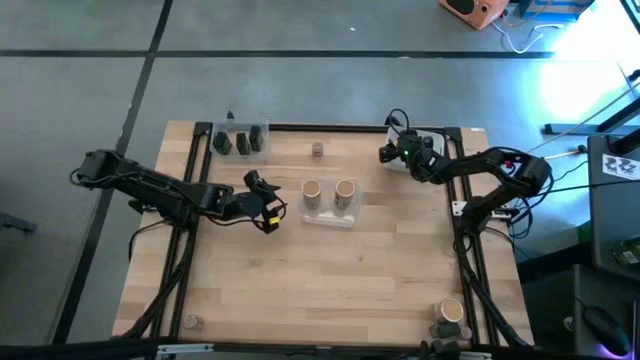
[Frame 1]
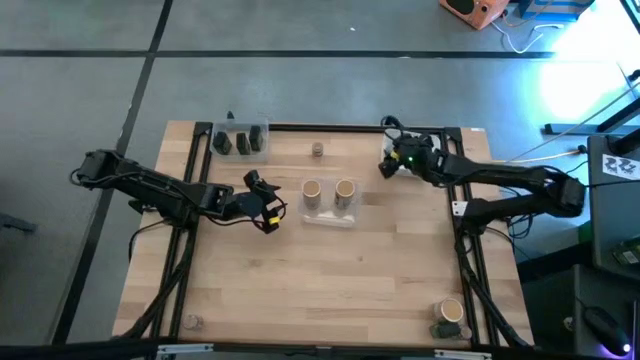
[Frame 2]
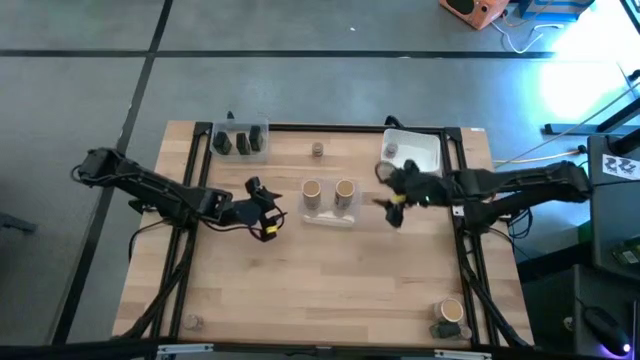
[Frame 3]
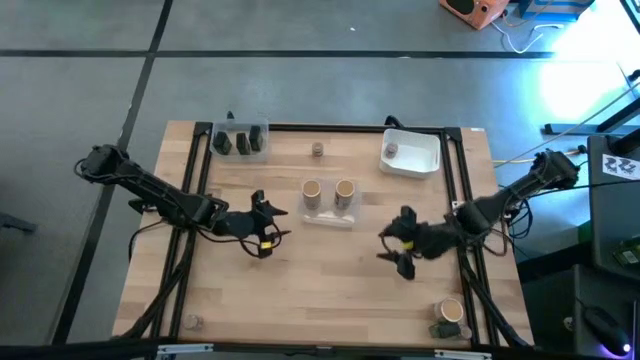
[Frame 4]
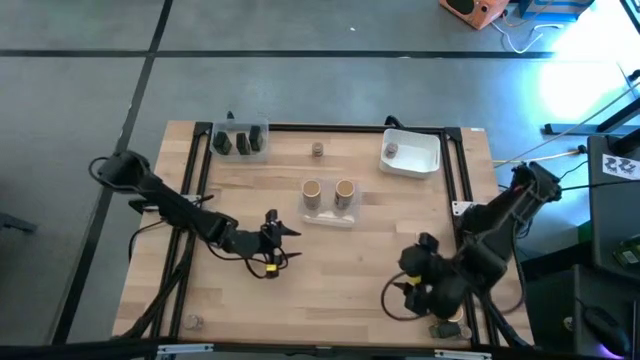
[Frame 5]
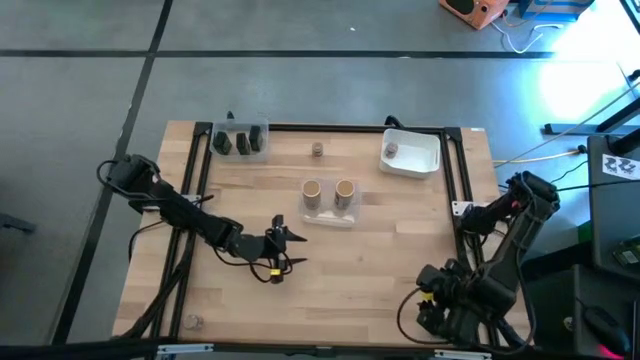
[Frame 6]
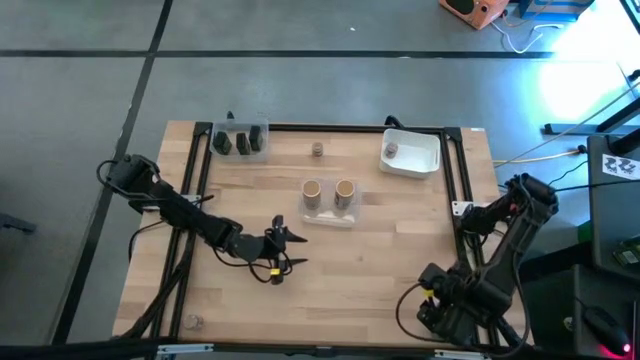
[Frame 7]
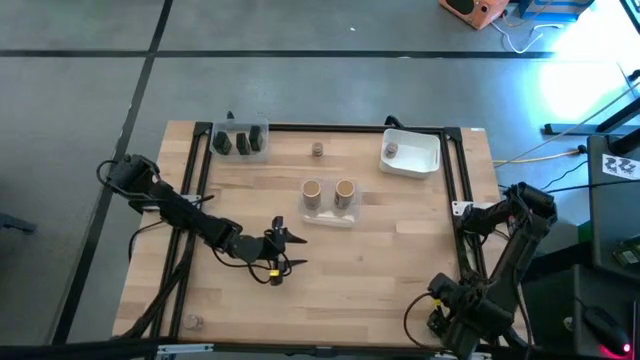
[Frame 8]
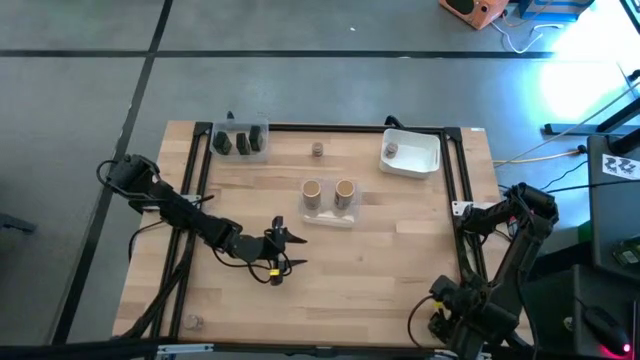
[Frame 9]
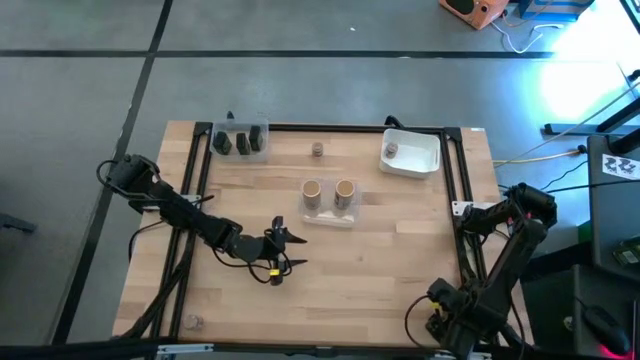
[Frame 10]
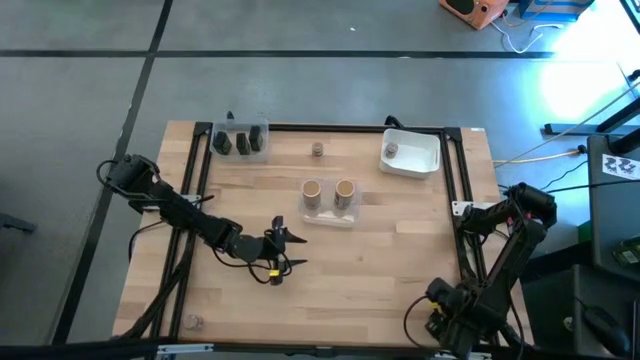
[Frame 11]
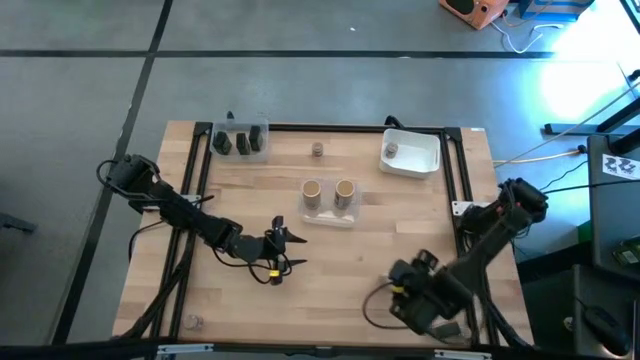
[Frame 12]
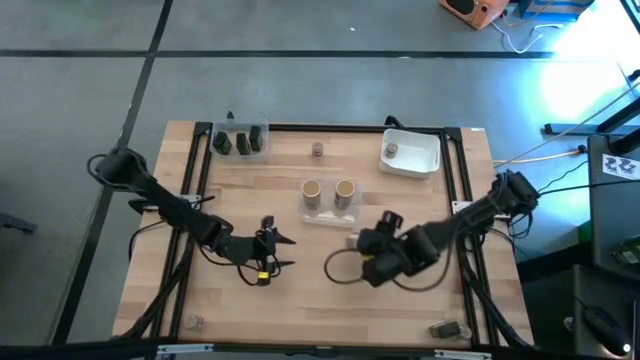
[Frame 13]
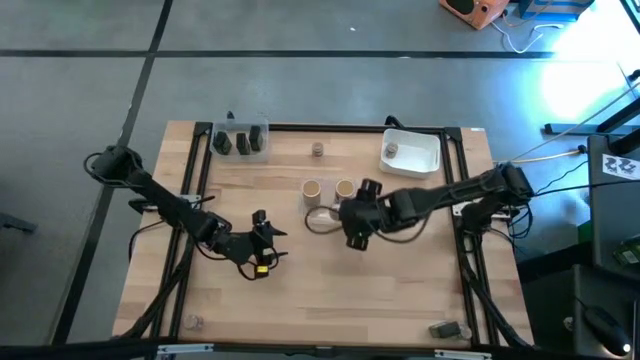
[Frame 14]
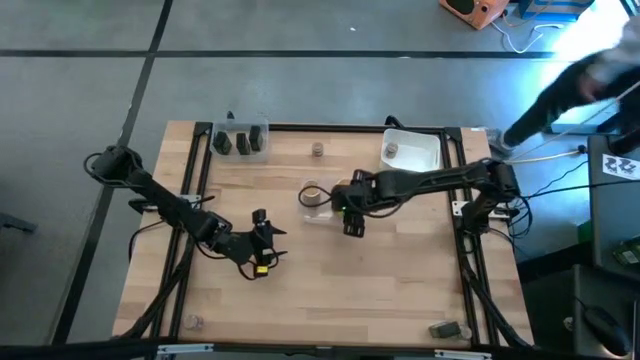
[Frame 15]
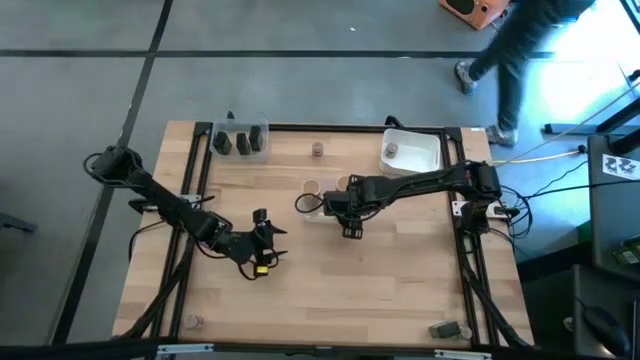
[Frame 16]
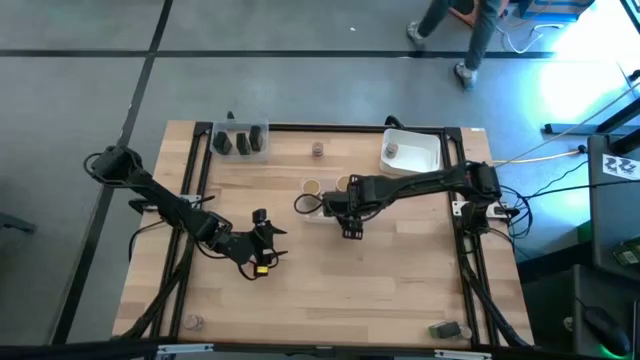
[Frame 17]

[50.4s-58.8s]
Task: Sort spices by type
Put the gold seasoning bottle into the bottom transparent bin

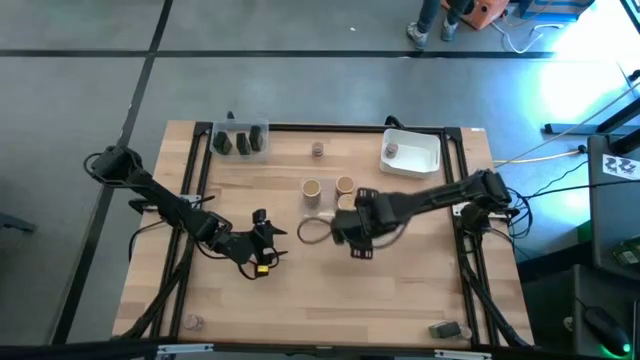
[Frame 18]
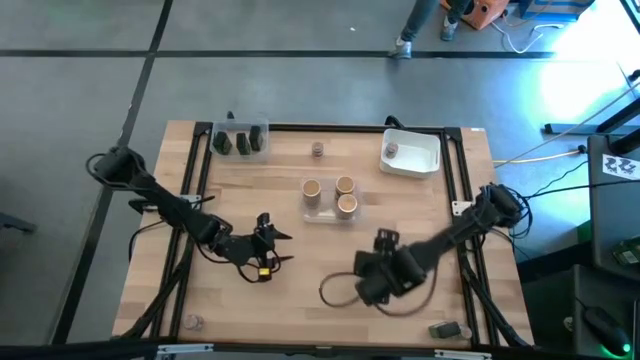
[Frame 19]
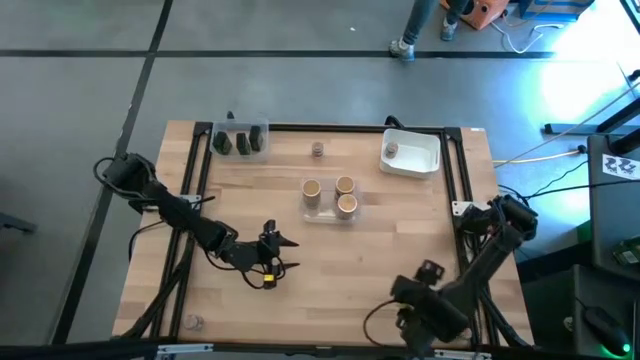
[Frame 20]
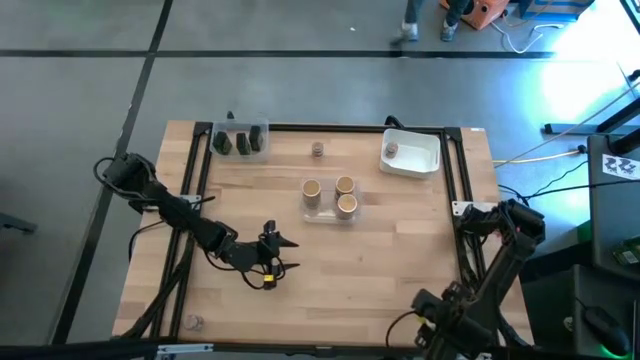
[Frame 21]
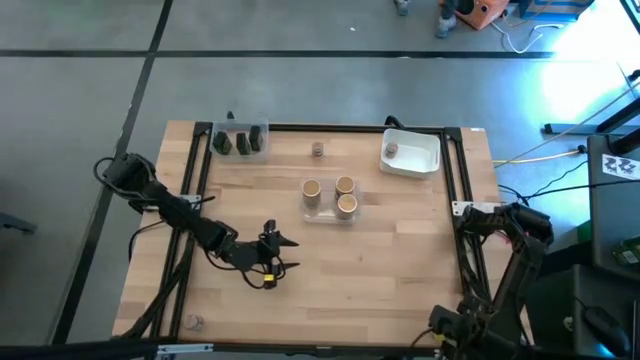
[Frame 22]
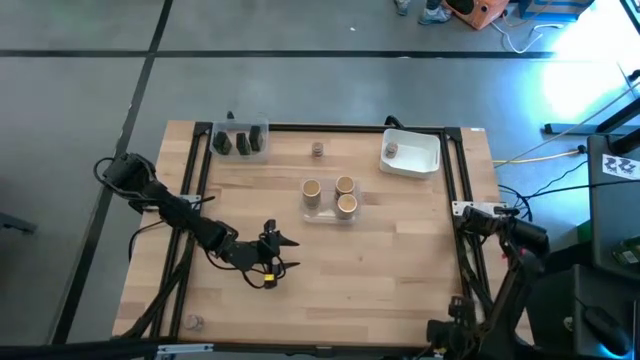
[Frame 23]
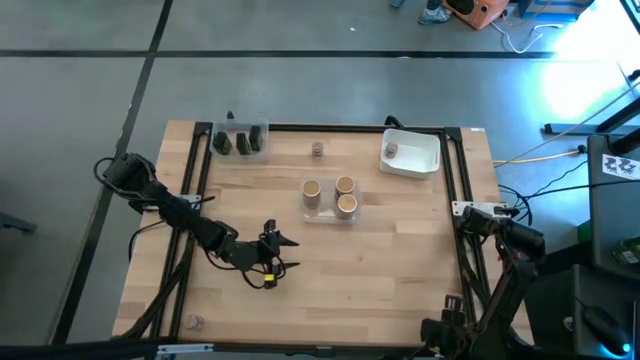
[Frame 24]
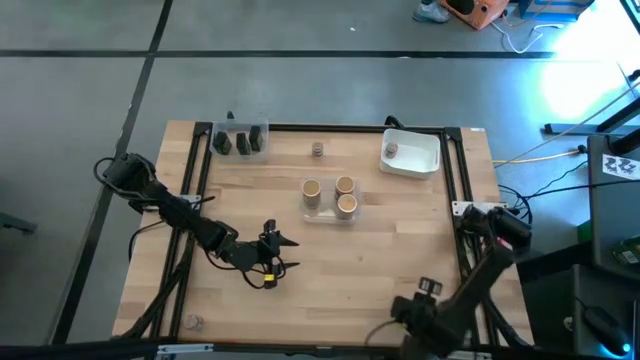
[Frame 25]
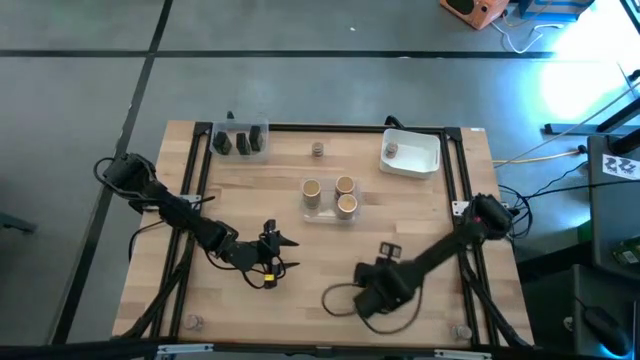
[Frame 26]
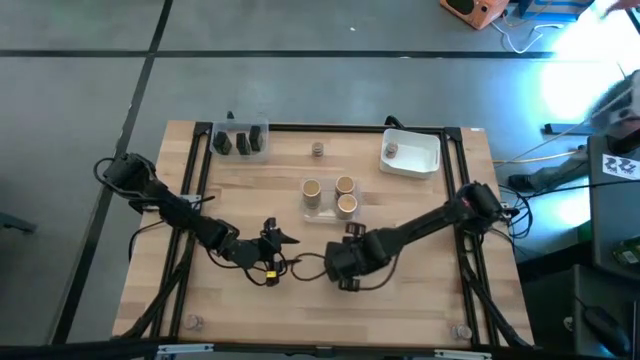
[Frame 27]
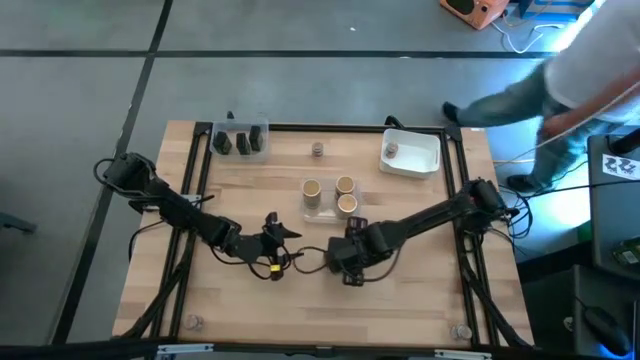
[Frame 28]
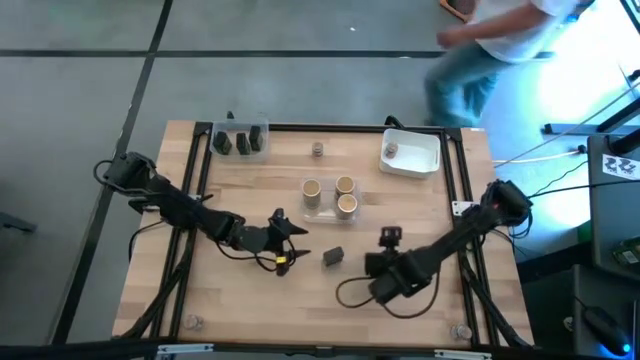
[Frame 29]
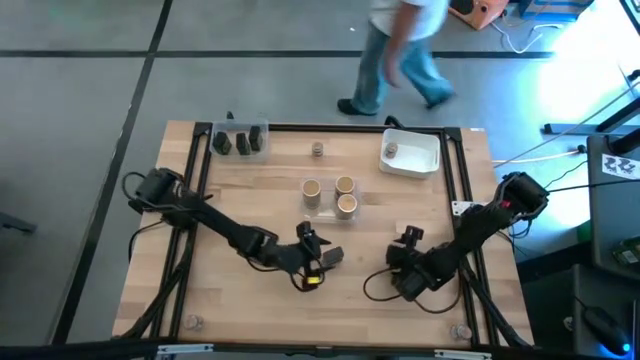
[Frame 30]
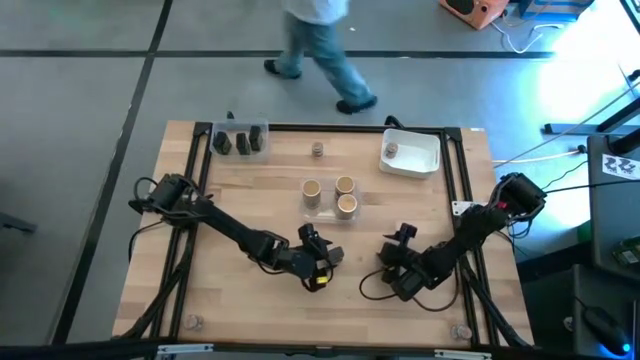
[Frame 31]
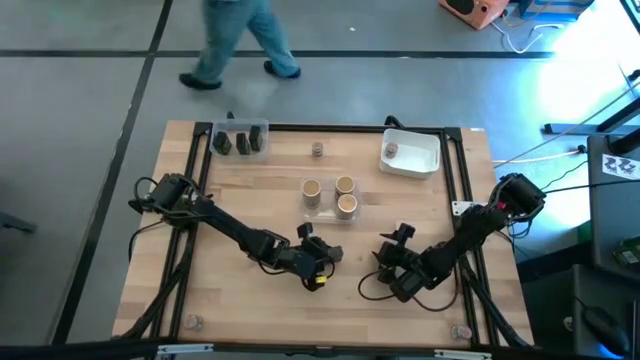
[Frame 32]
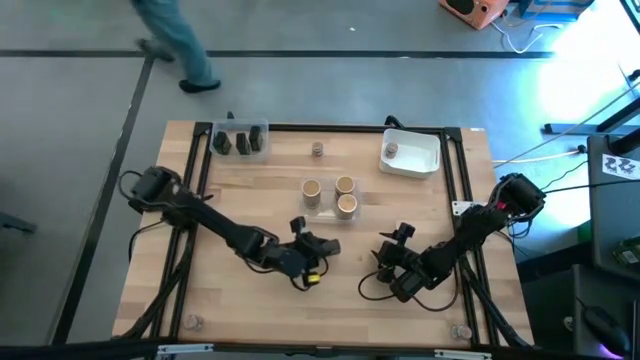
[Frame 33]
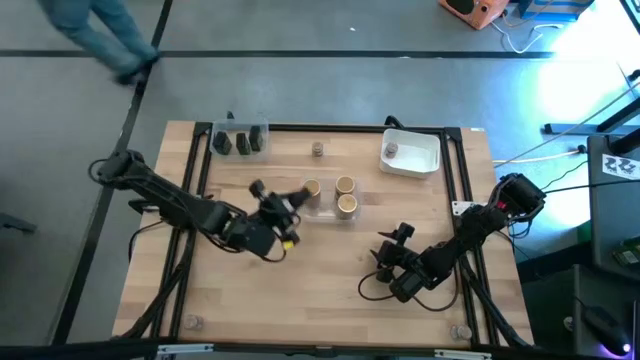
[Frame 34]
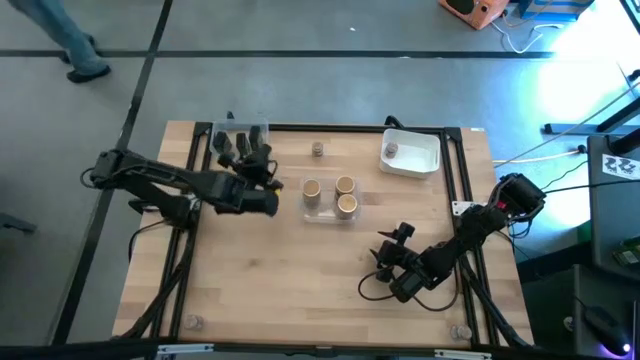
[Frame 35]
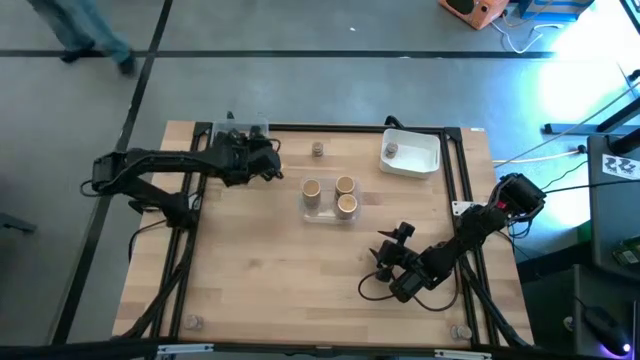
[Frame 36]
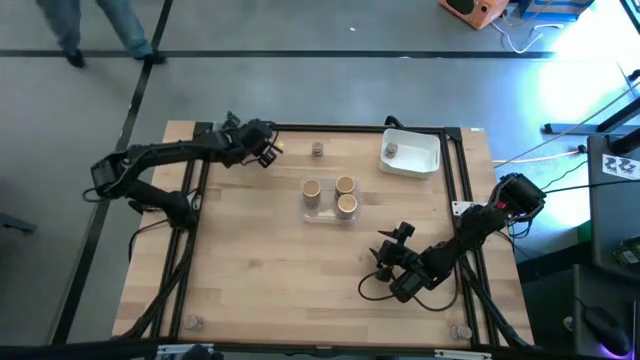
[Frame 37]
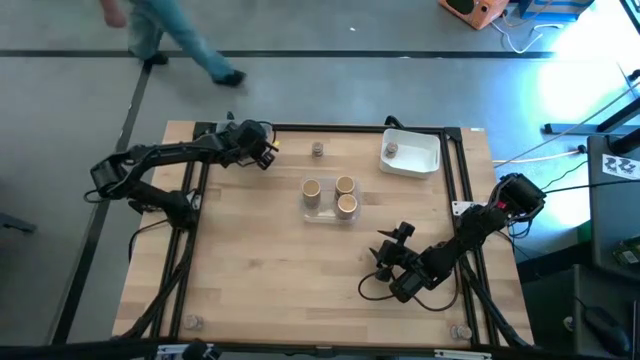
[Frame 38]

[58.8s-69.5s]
Put the black seasoning can into the top transparent bin

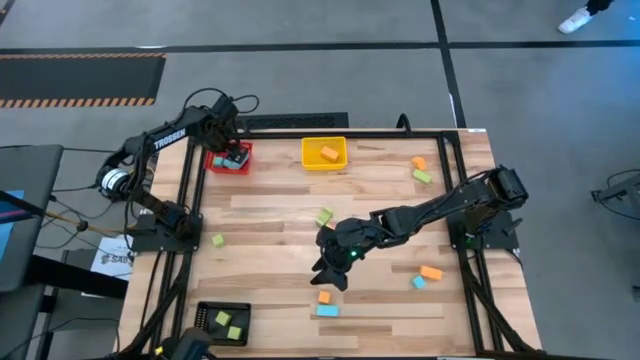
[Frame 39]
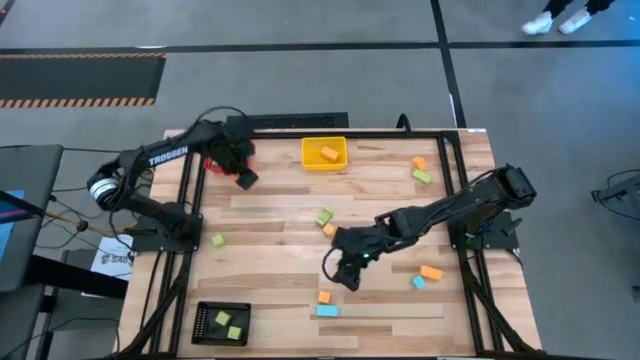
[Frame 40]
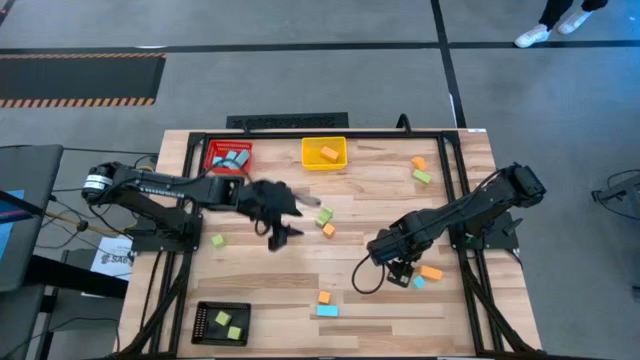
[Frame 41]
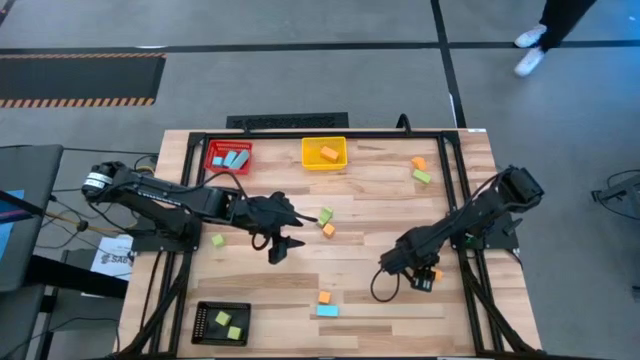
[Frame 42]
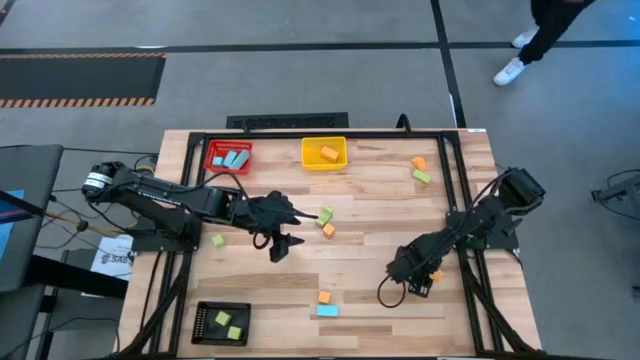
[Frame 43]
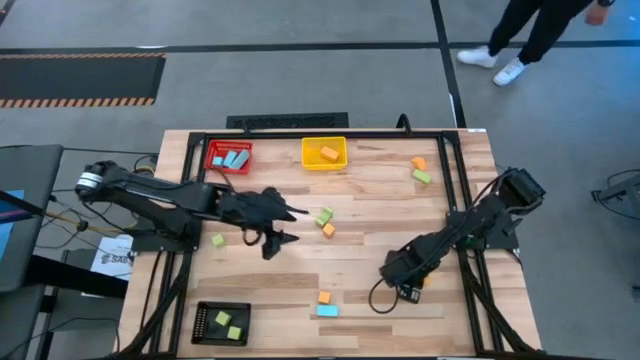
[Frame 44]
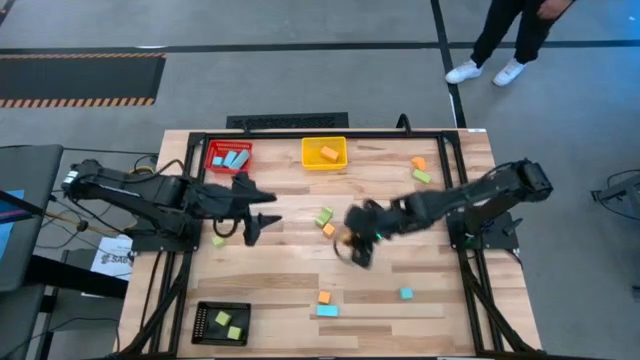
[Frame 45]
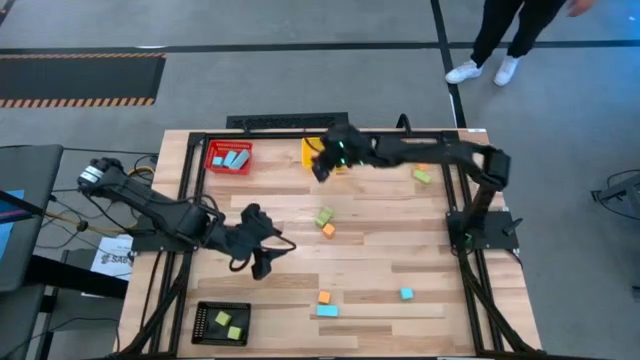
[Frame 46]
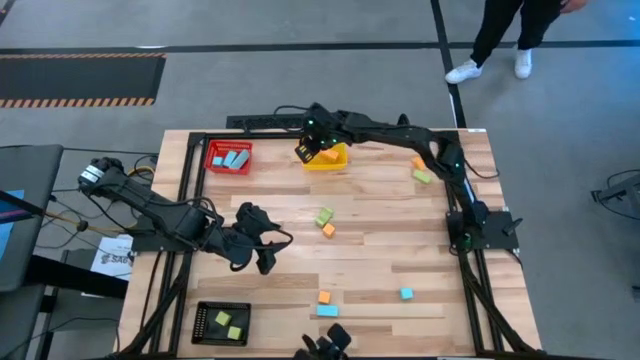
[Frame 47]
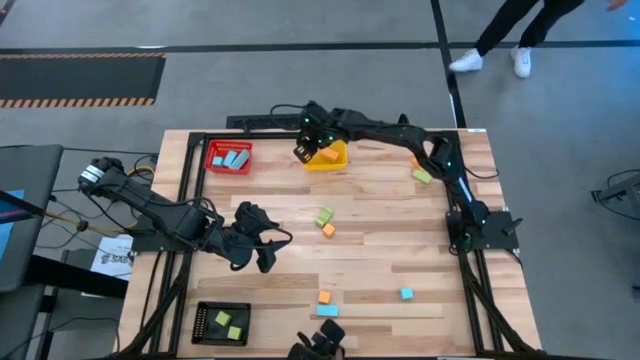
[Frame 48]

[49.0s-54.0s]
Task: Sort & place blocks by color
Put the wooden yellow block into the yellow bin
